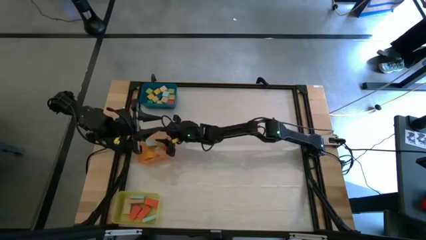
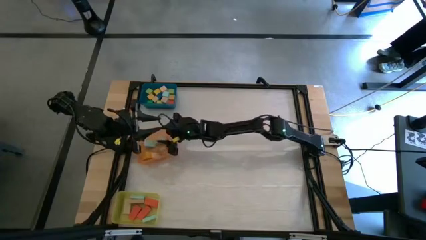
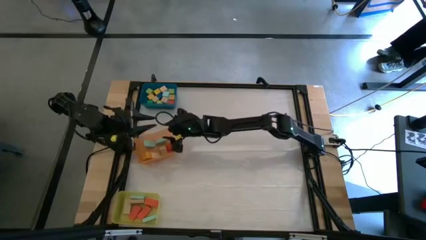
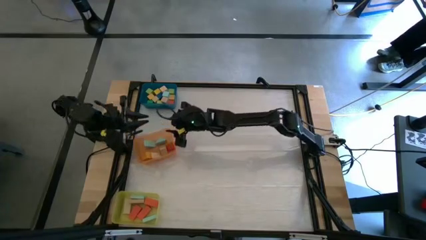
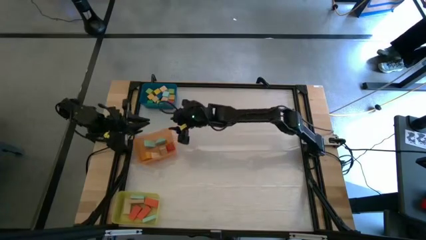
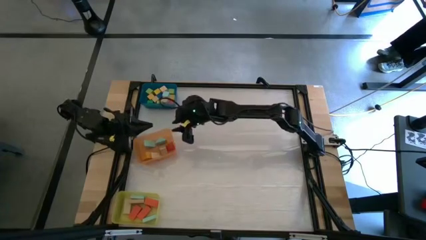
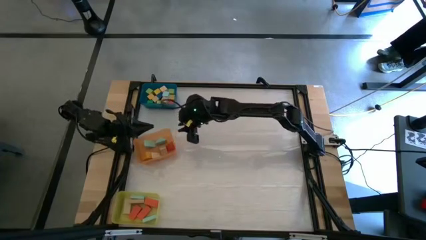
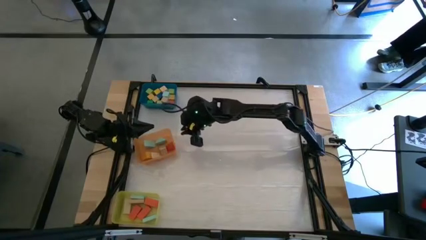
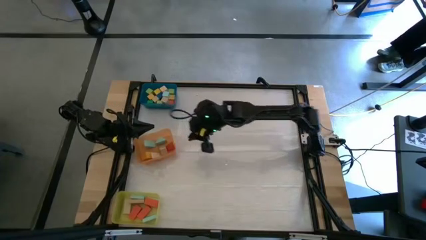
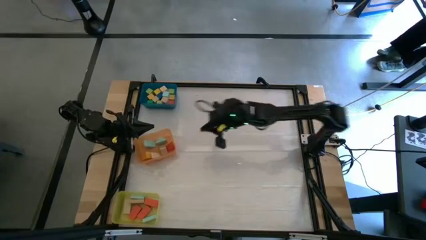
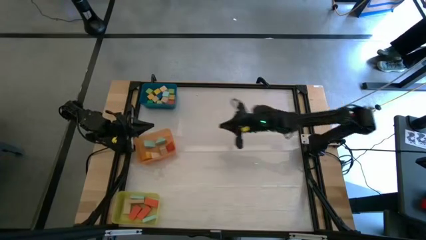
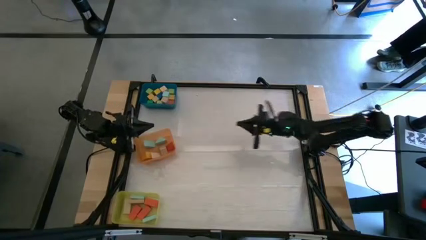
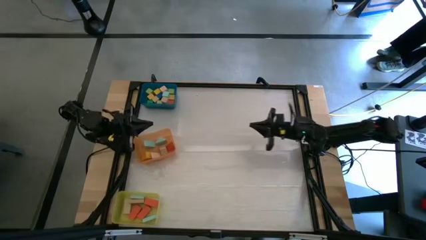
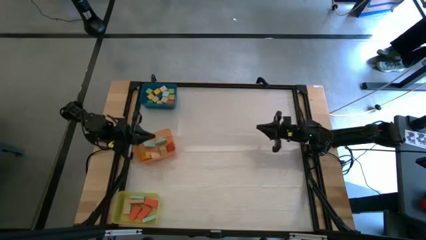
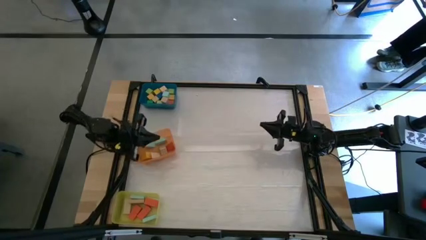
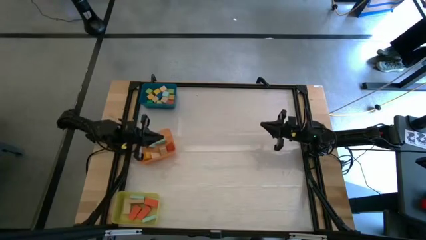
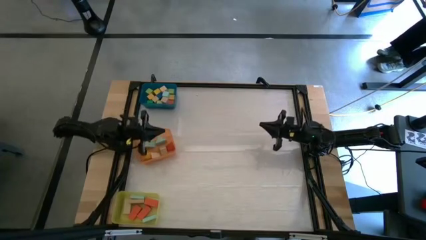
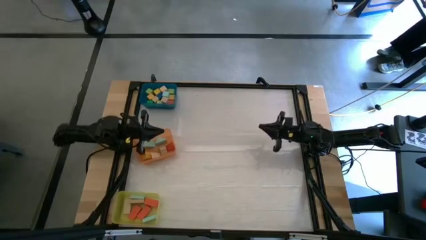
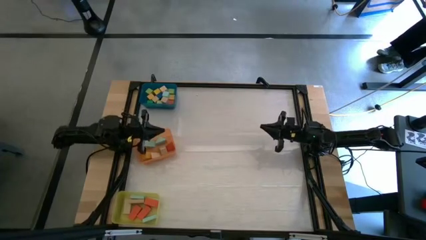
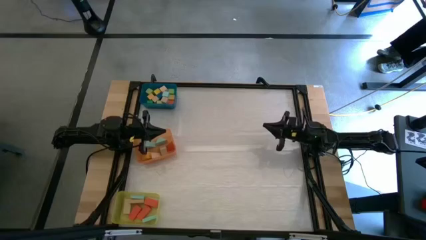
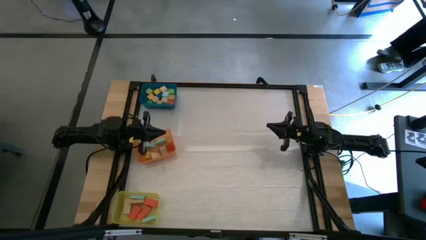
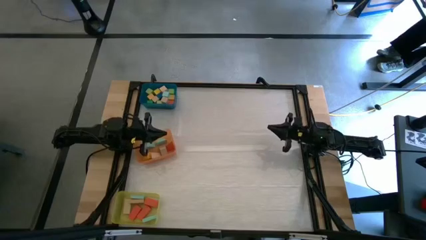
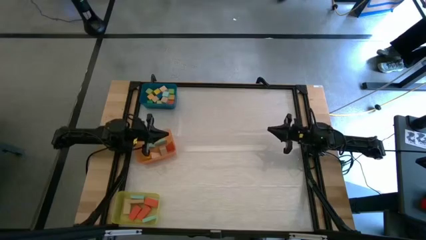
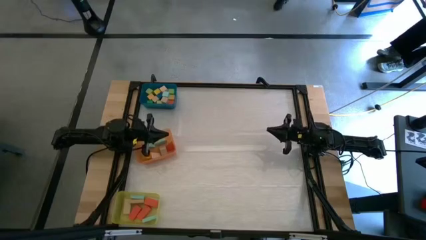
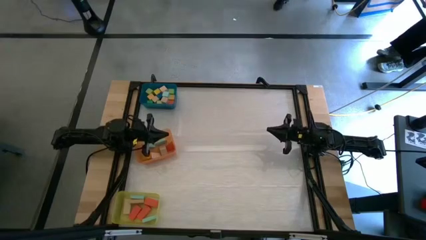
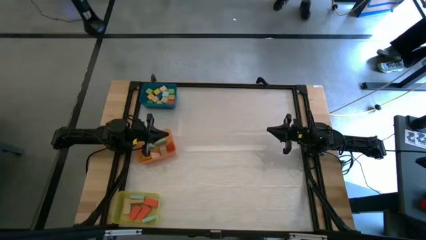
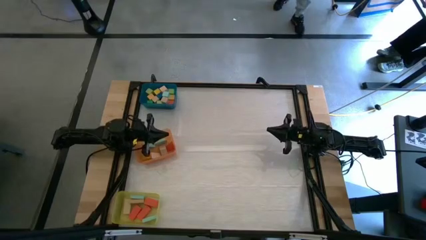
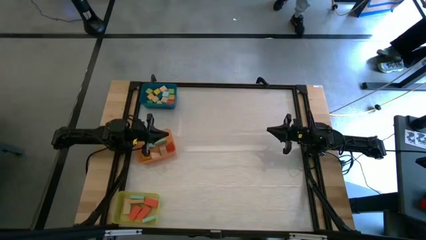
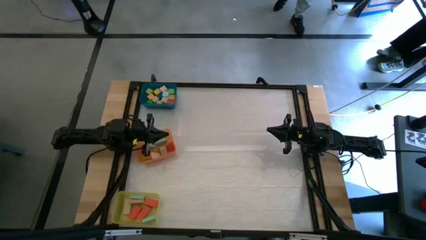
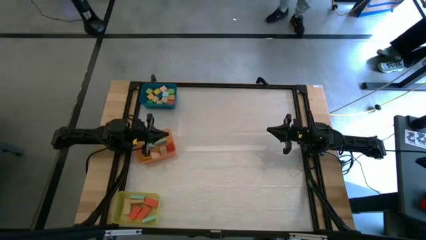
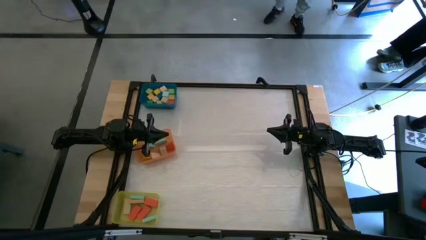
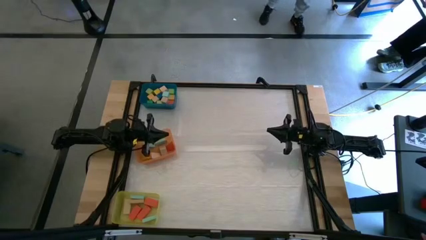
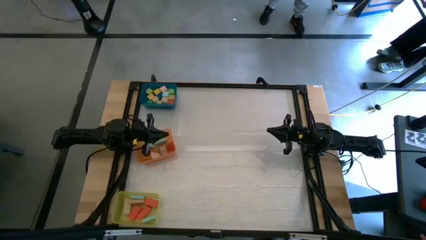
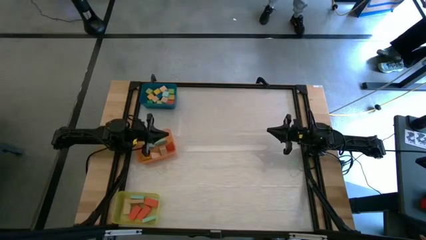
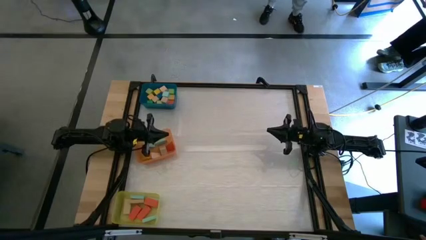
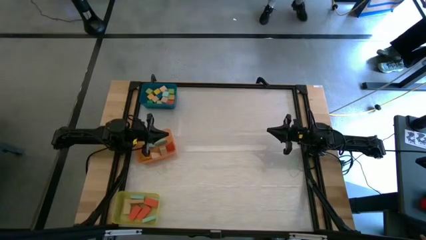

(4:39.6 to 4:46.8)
Task: Sort blocks by size
Return to Home Position

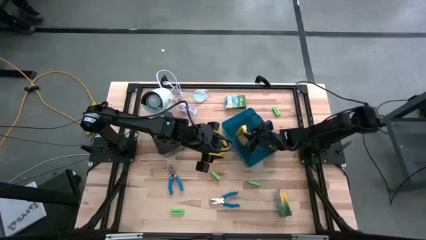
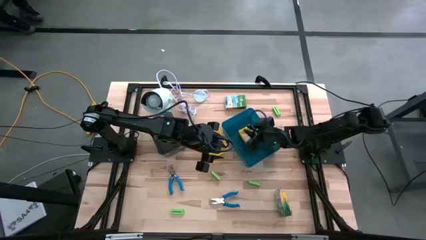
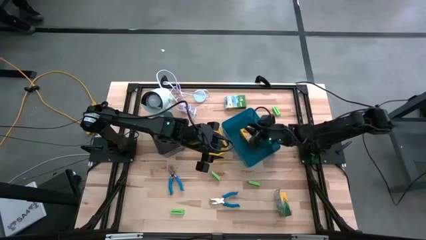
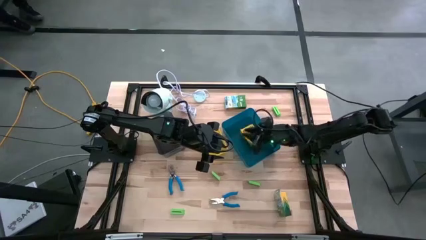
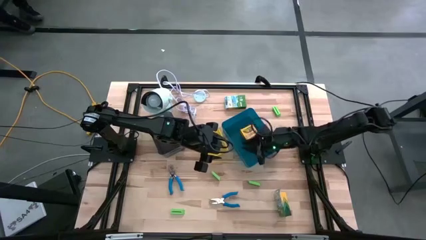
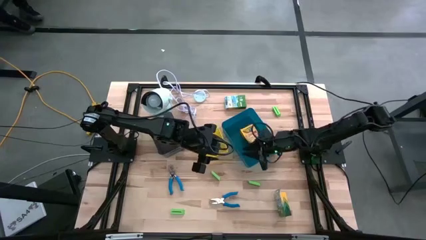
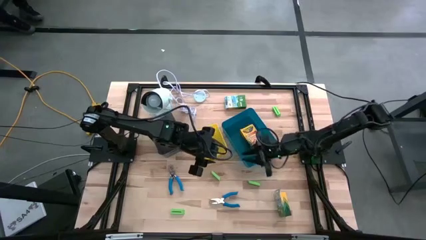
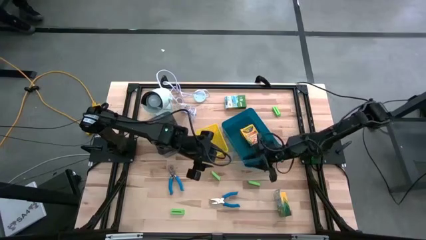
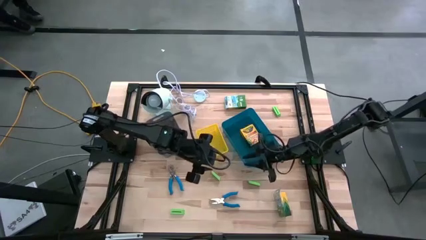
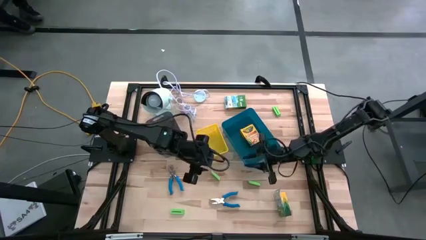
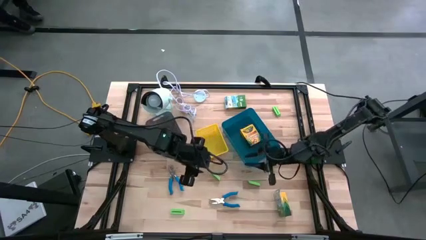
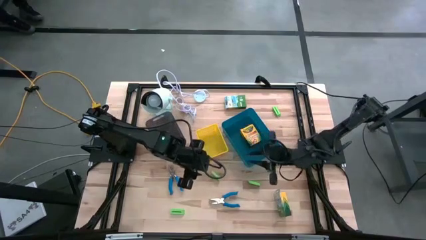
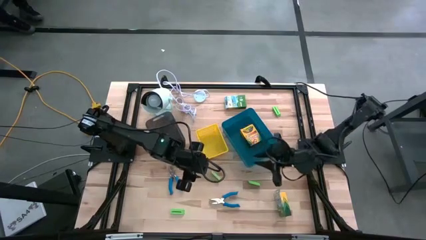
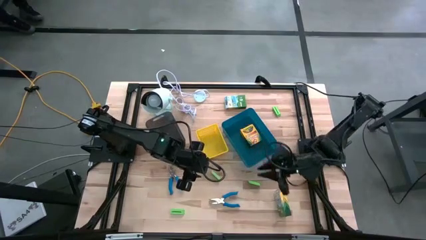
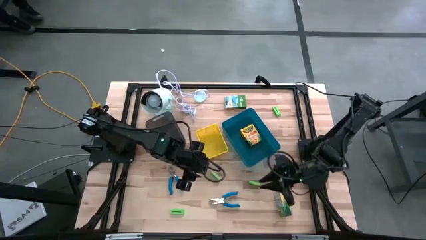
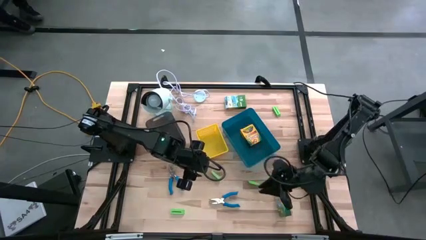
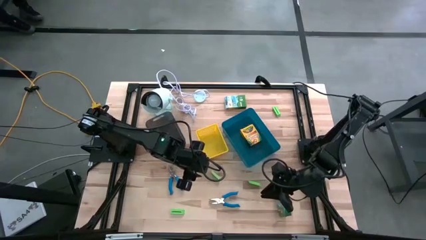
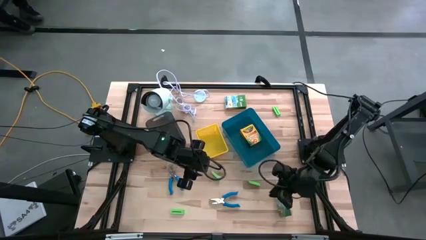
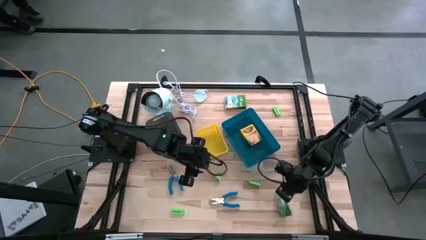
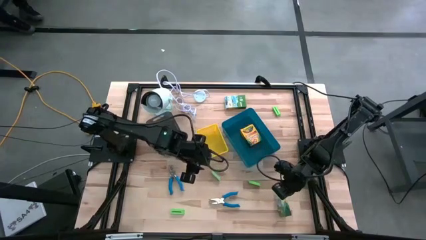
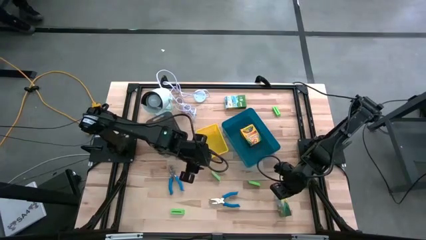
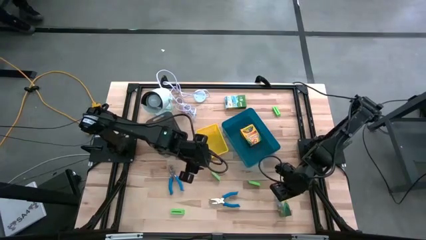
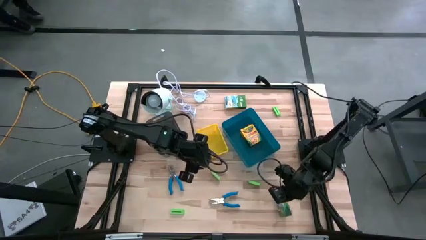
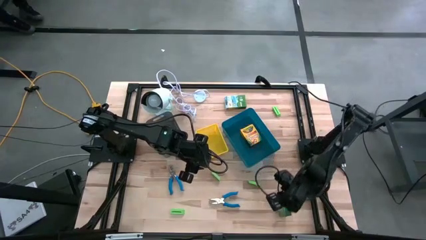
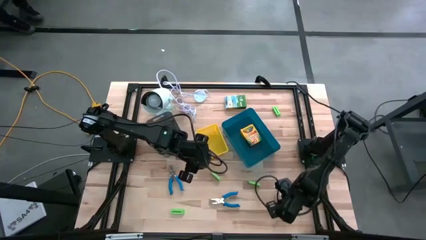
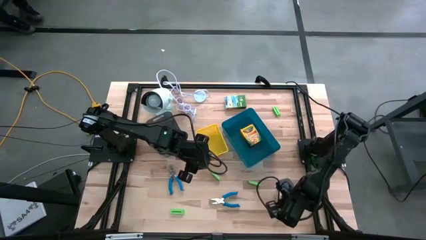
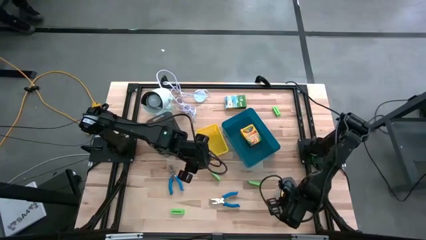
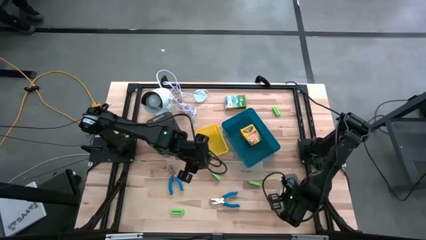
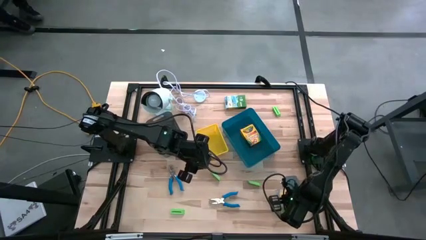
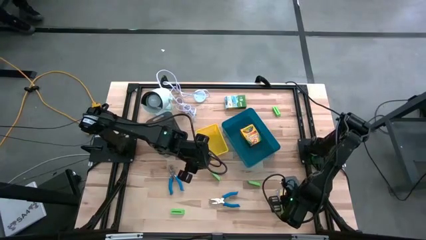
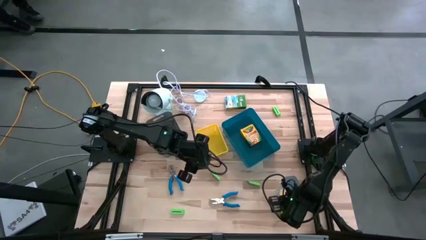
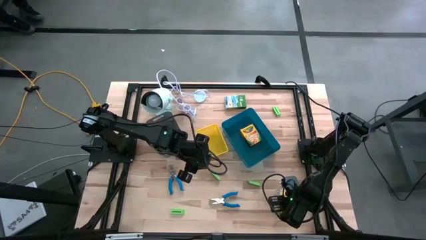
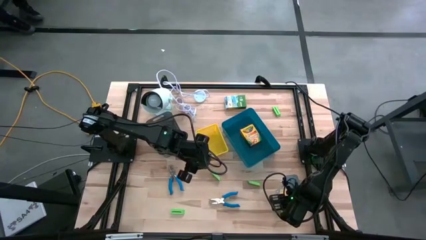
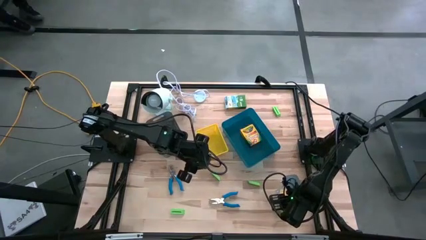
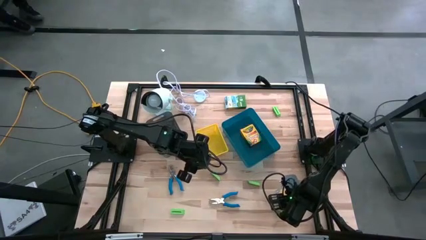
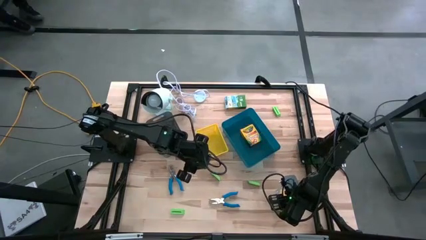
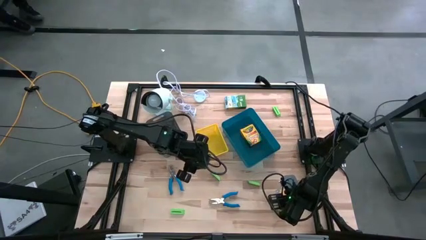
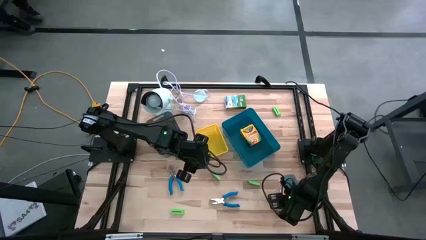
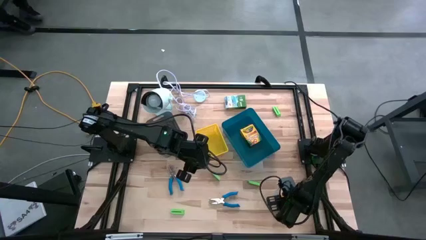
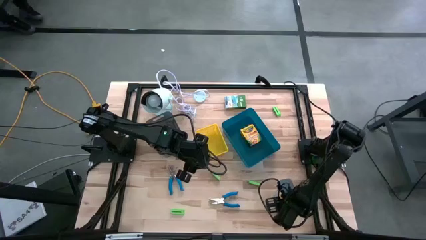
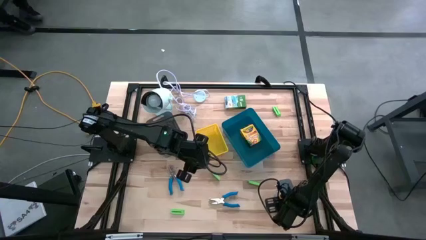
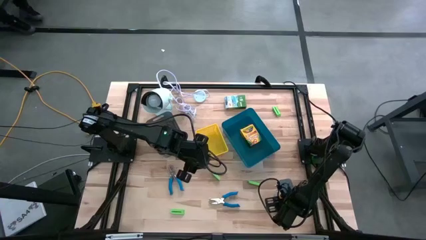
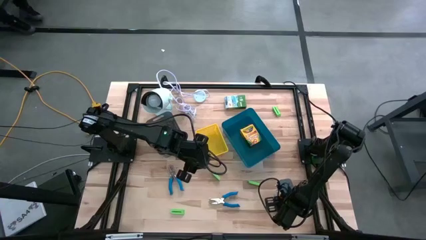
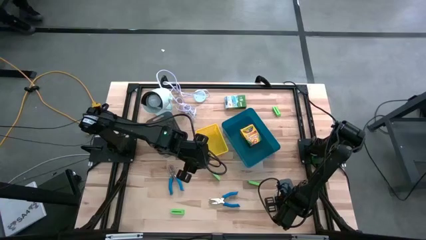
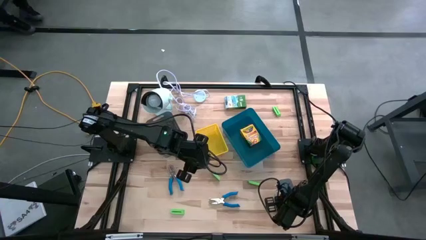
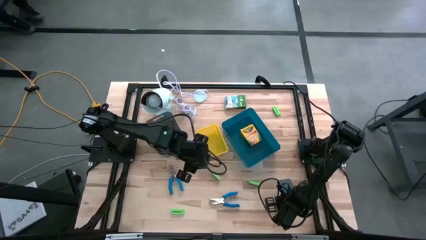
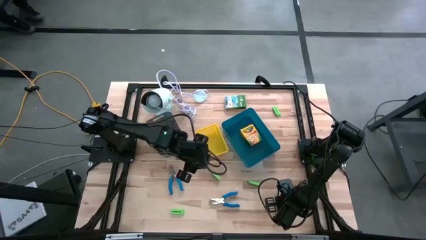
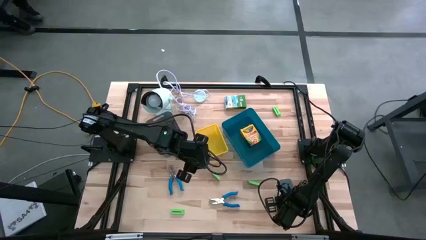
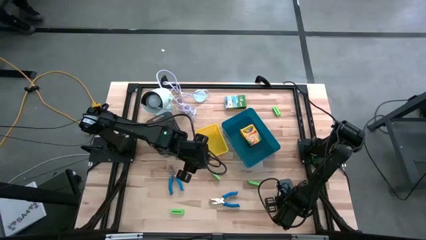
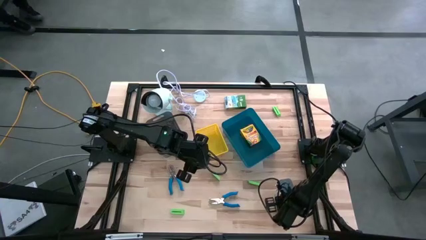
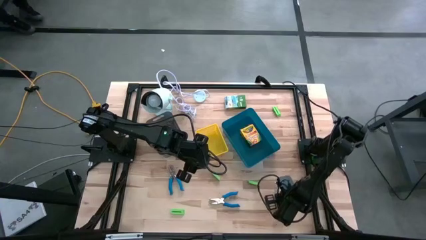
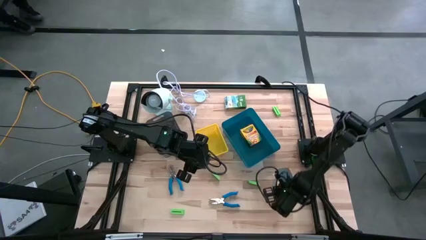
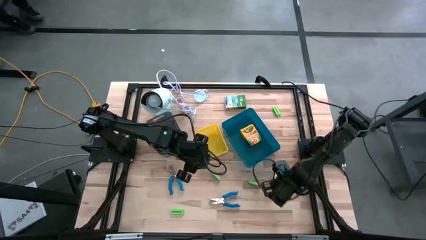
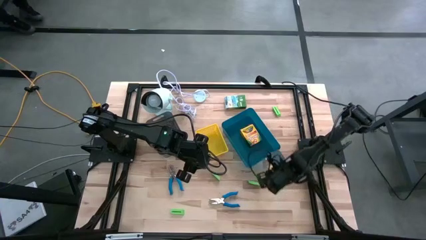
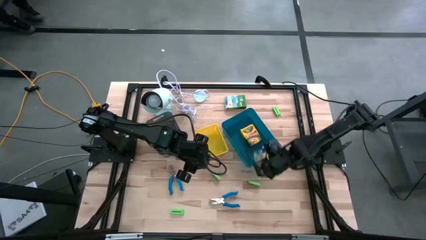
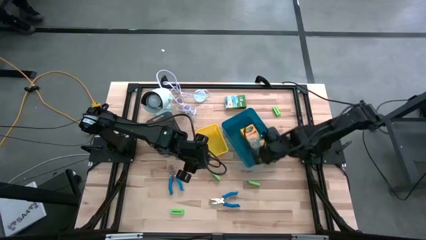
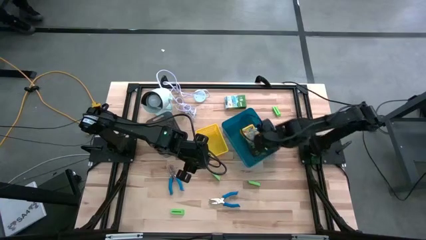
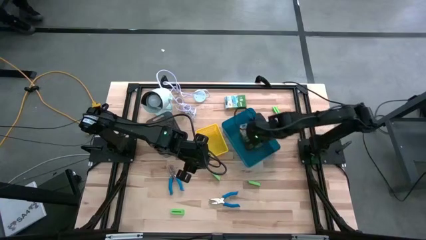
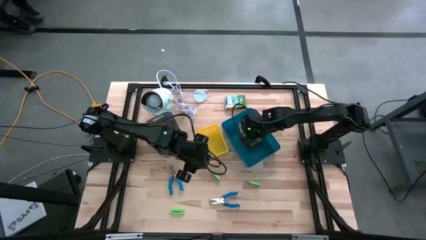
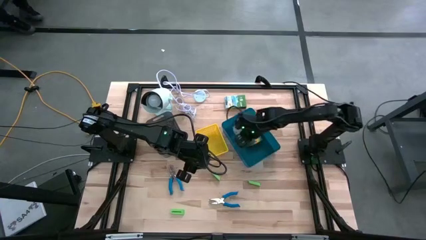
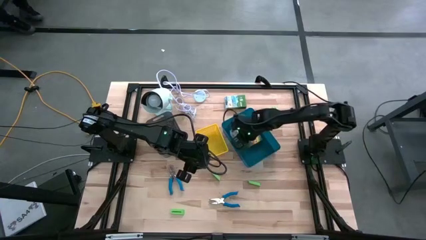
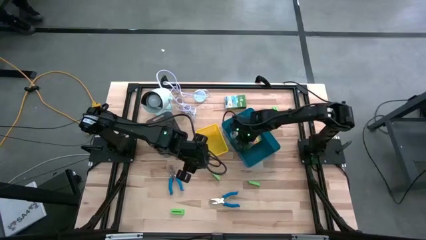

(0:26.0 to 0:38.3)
Task: Pick & Place School Supplies
Put the crayons box into the blue bin
